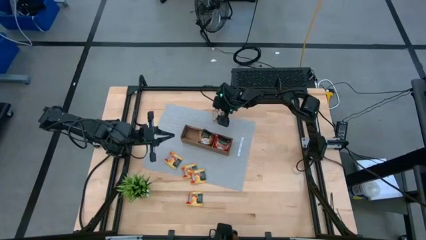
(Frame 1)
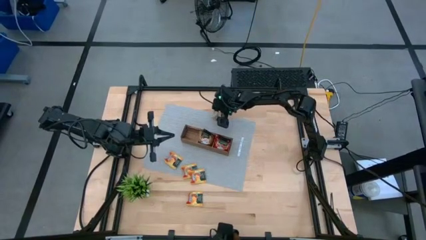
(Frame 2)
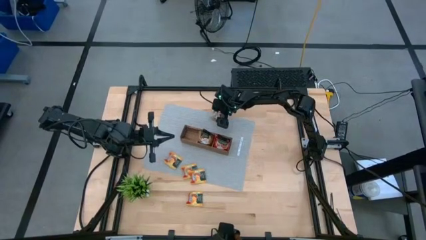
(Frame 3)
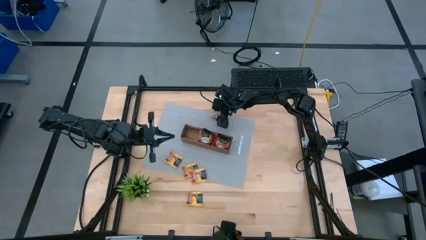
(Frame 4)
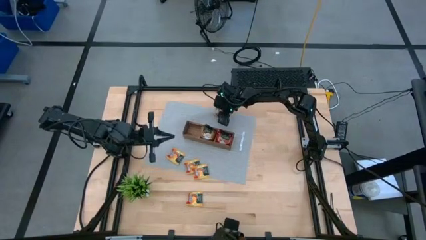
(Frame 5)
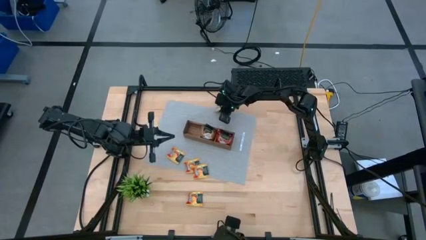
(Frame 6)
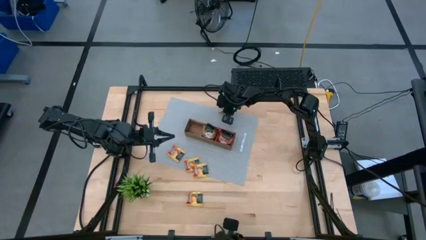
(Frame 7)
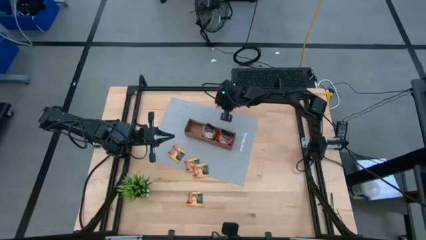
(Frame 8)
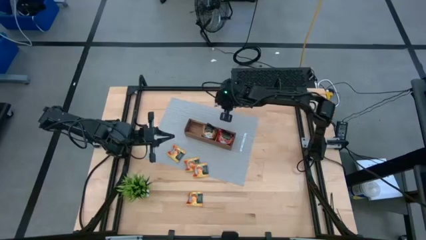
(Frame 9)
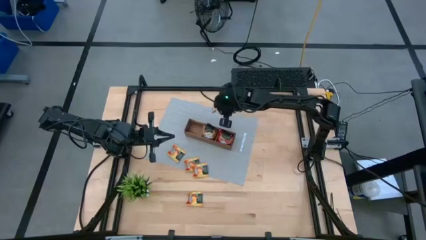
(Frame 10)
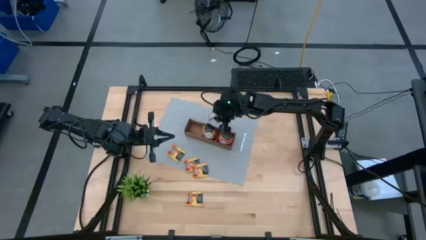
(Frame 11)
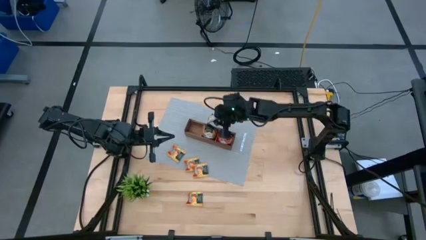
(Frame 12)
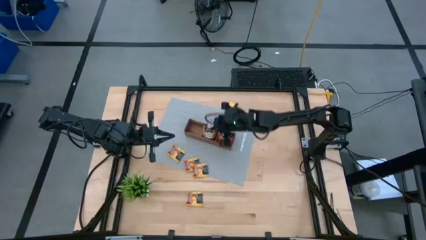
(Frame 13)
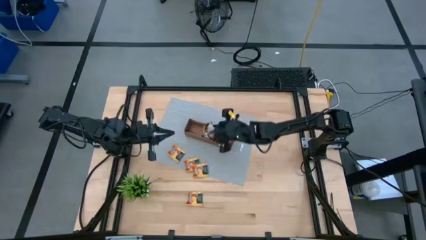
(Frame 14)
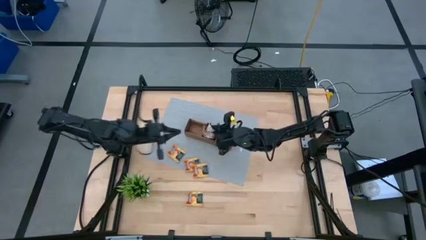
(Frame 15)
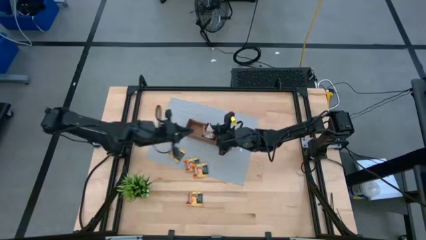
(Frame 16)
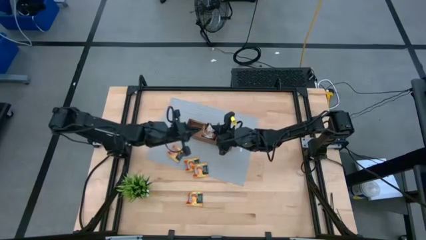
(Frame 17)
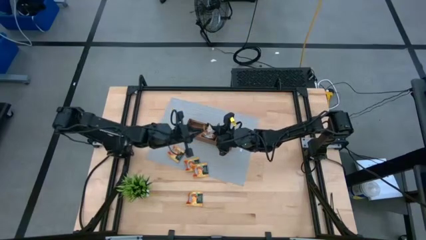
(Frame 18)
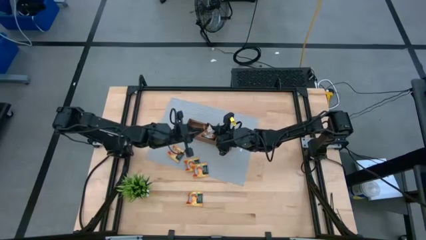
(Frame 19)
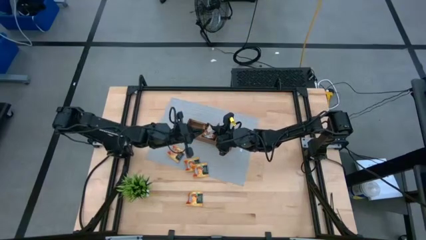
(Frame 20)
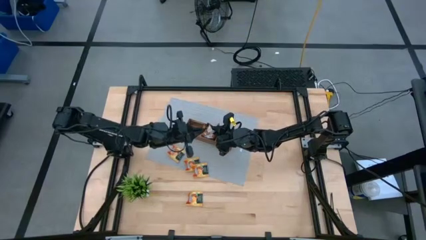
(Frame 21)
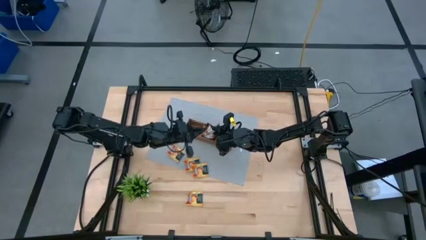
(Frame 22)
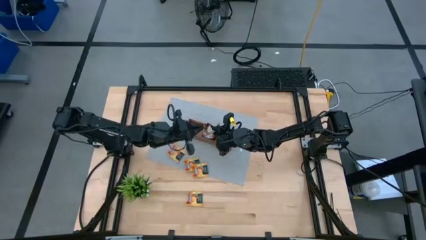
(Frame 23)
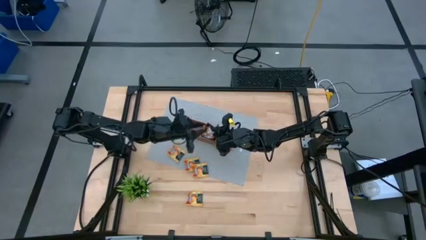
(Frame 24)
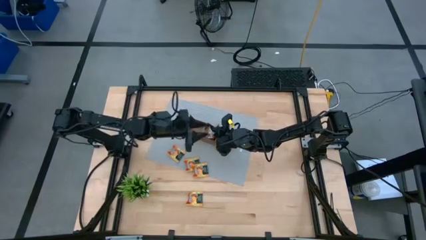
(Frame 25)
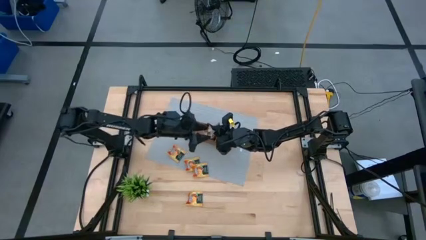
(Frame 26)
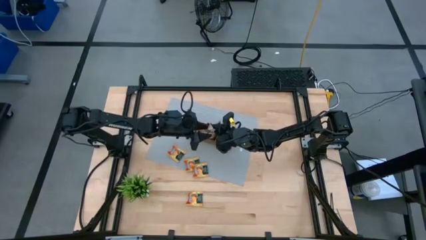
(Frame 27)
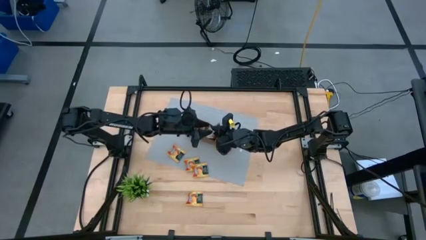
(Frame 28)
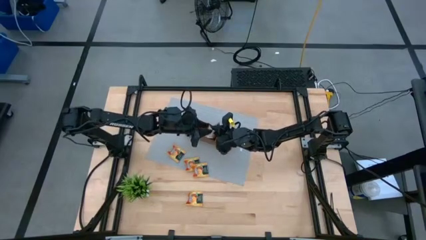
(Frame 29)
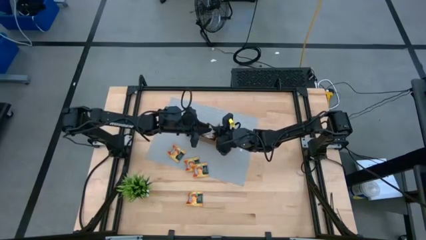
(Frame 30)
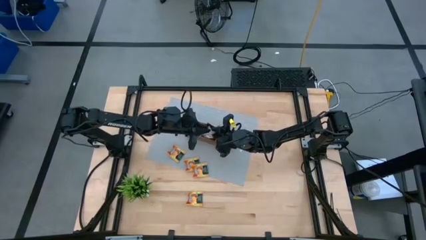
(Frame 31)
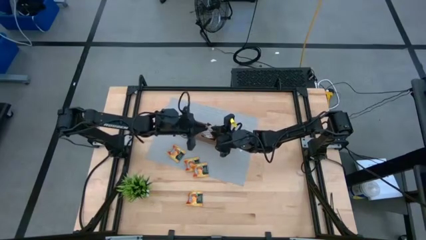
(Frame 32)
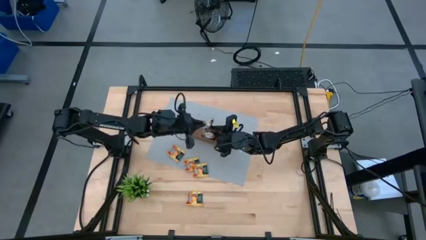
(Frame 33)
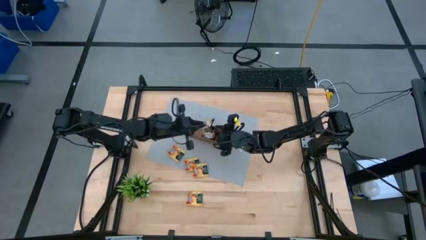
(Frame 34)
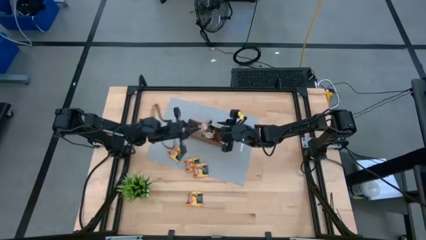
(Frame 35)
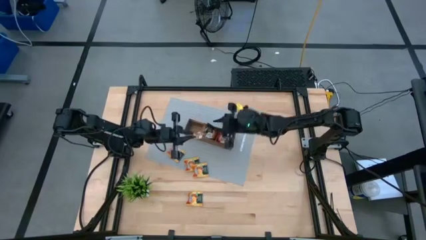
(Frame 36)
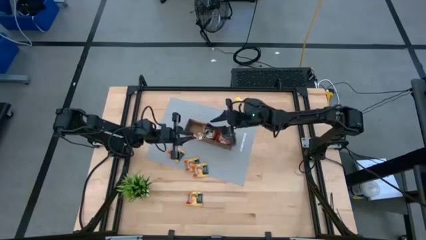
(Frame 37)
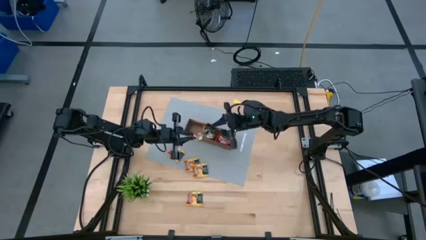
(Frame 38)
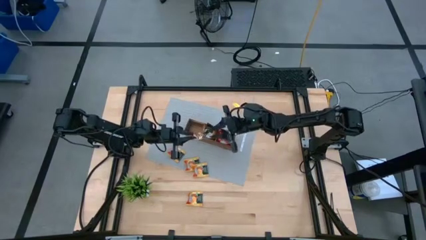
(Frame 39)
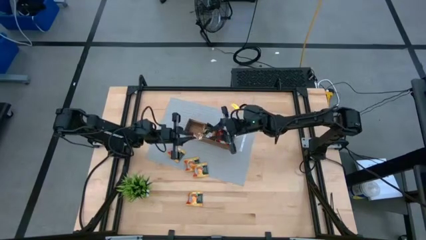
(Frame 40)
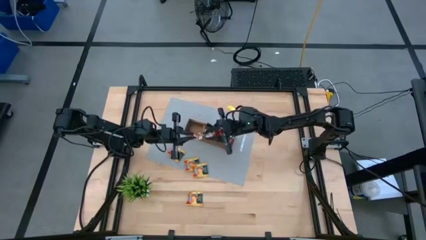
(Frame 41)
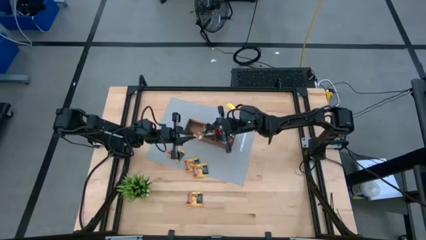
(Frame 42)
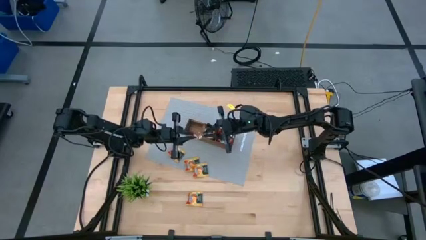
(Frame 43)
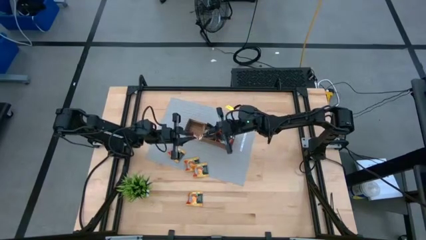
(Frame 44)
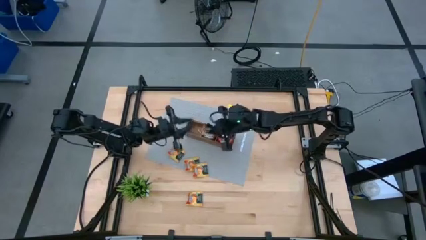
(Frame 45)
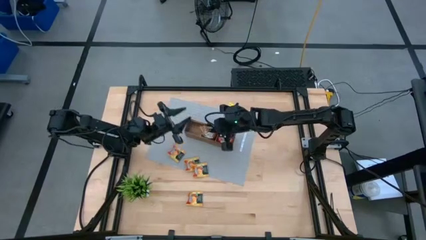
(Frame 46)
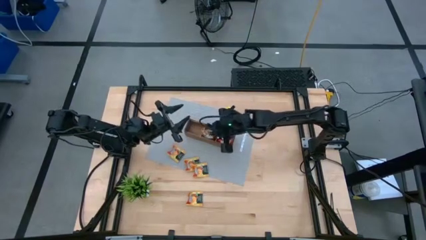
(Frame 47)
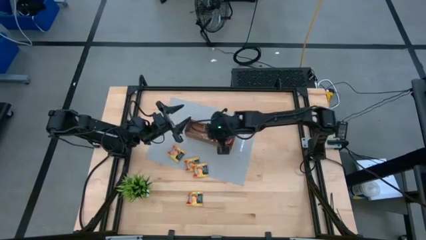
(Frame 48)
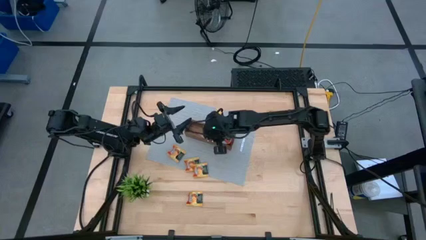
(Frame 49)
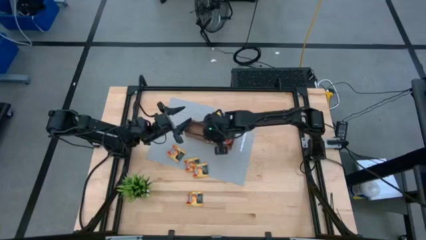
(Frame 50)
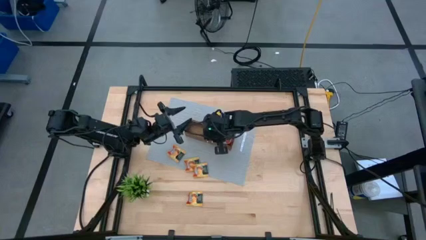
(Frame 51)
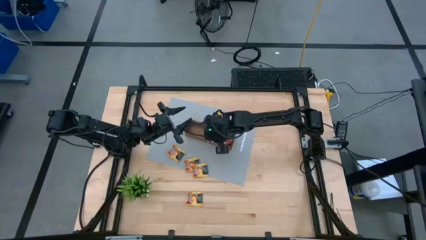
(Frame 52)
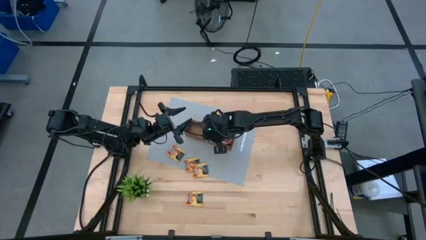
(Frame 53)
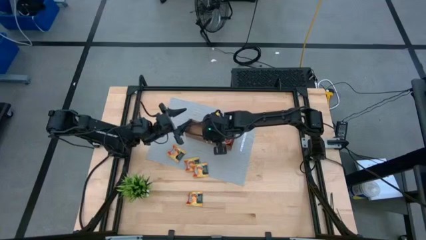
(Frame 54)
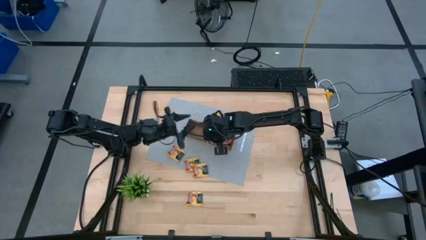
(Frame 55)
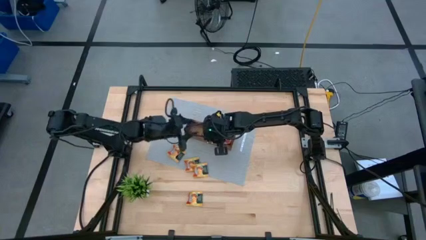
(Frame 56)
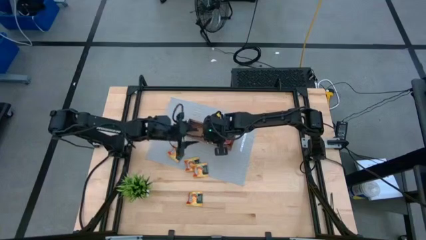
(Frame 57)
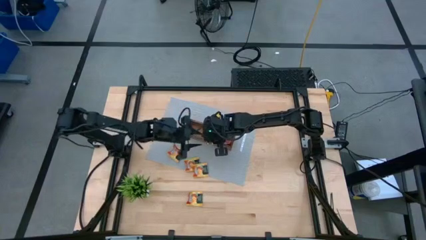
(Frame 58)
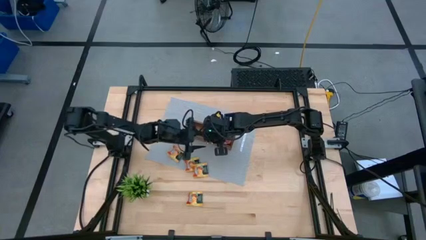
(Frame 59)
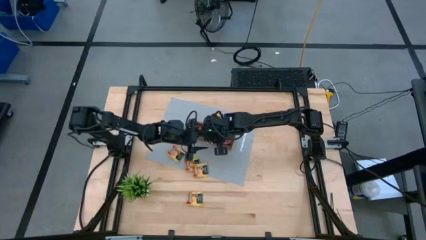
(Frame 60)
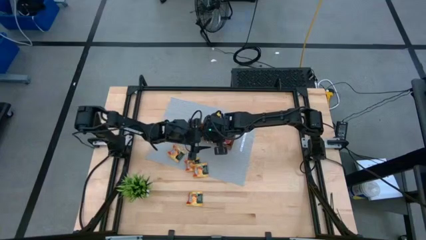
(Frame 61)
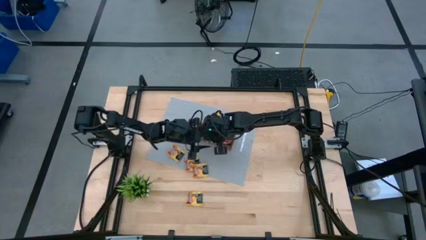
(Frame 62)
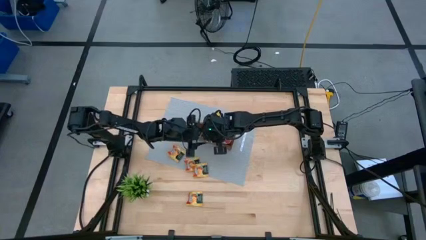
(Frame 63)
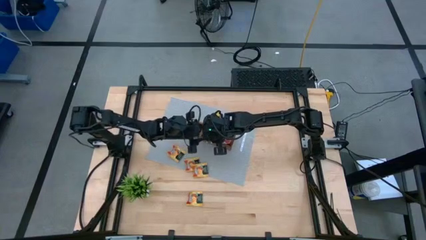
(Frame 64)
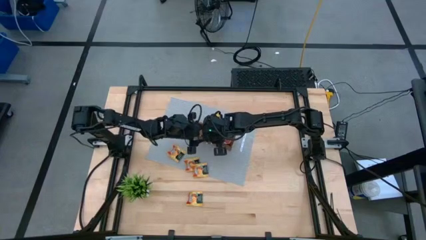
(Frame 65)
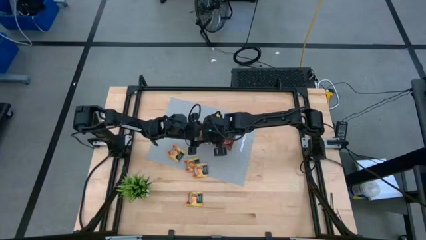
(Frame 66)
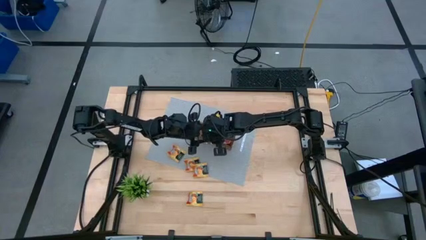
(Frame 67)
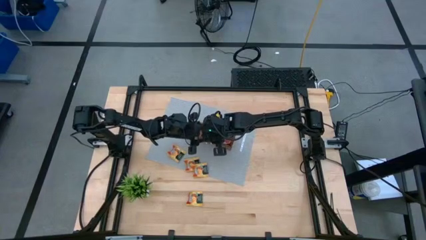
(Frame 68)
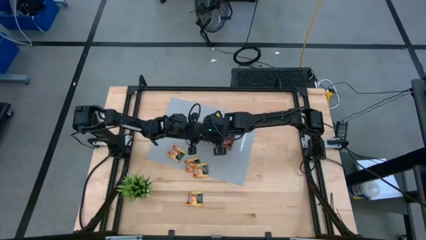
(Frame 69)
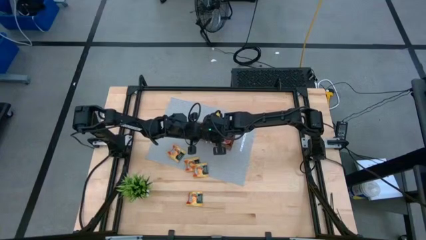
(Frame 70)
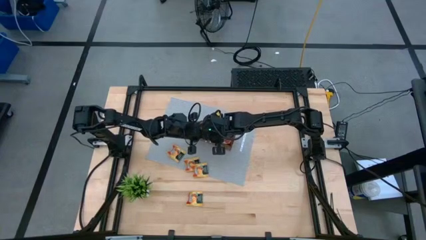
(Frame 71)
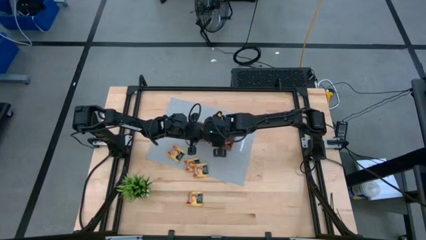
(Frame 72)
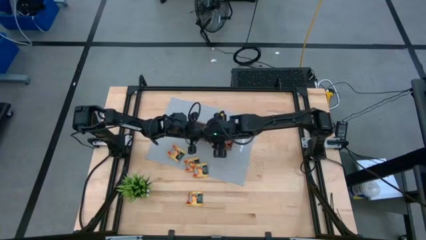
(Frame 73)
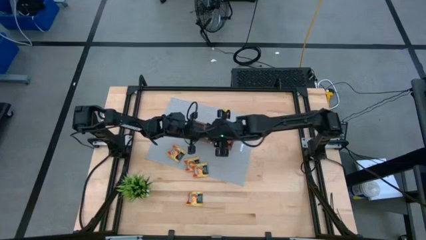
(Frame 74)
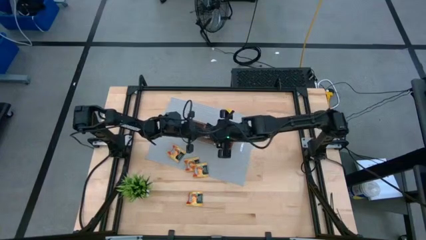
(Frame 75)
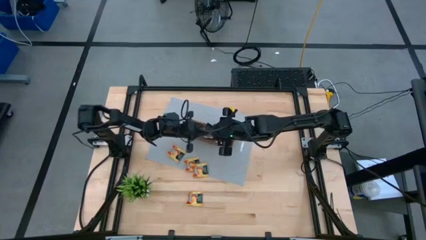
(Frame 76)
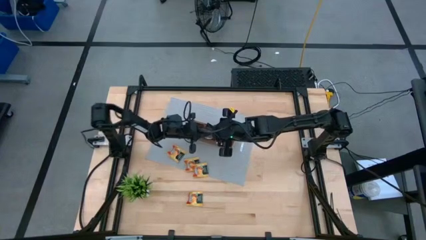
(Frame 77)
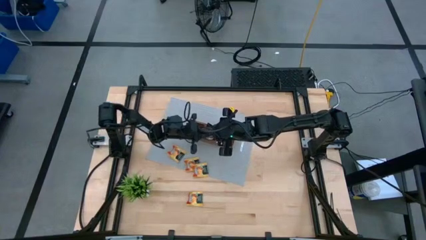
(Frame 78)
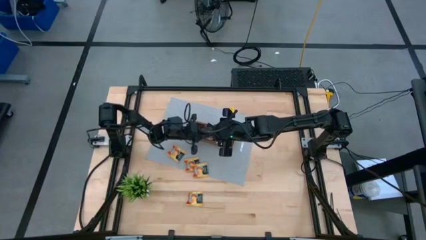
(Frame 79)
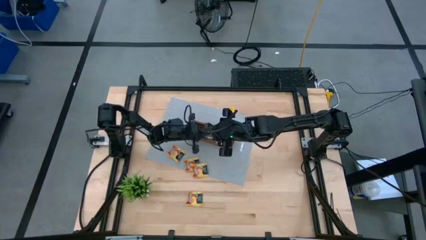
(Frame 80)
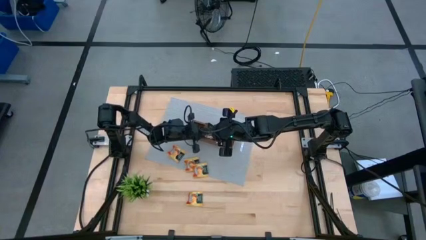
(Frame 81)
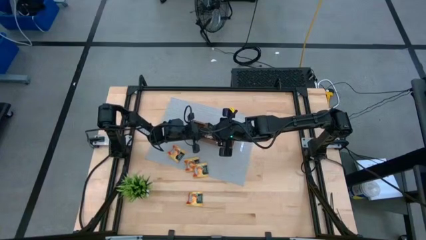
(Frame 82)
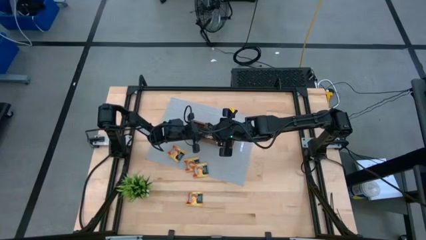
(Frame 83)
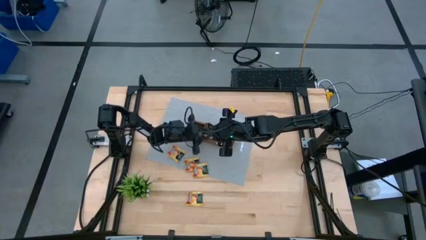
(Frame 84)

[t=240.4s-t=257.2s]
Task: Pick & Place Tea
Put the brown tea bag into the wooden organizer
